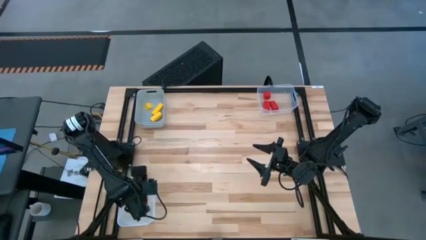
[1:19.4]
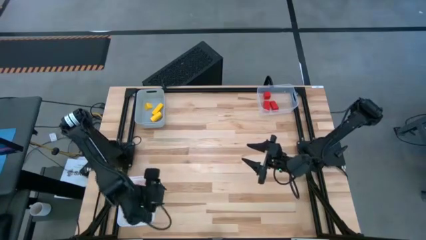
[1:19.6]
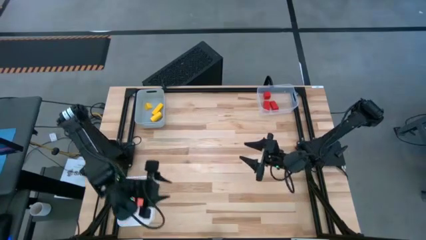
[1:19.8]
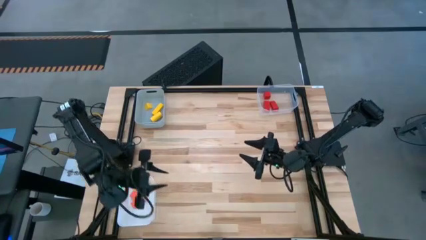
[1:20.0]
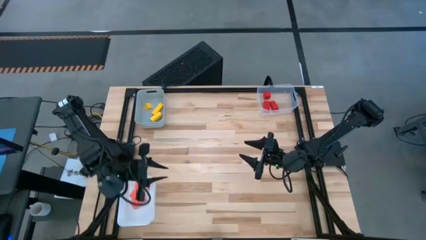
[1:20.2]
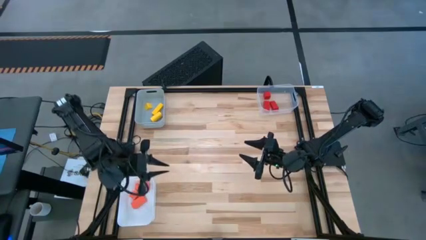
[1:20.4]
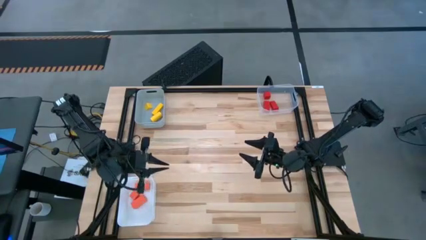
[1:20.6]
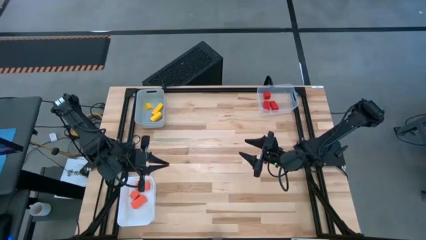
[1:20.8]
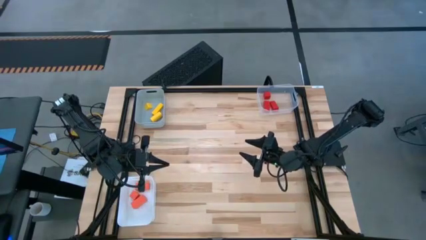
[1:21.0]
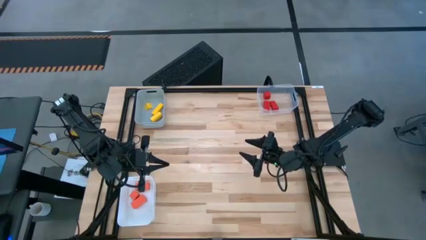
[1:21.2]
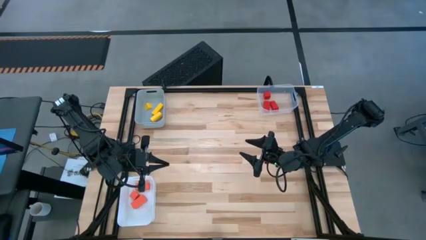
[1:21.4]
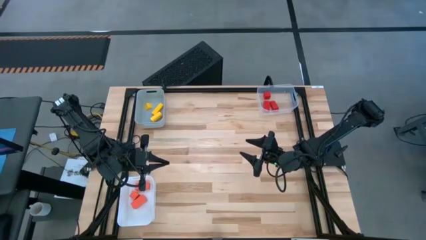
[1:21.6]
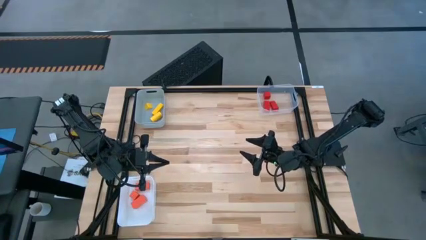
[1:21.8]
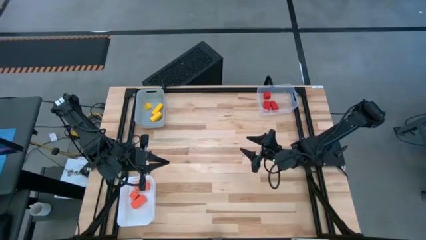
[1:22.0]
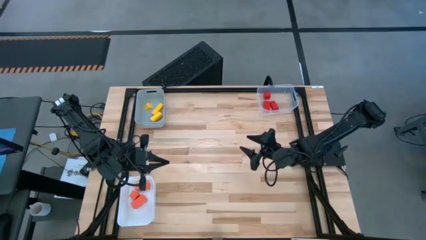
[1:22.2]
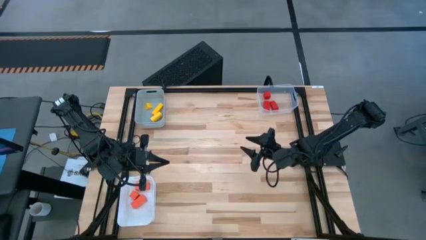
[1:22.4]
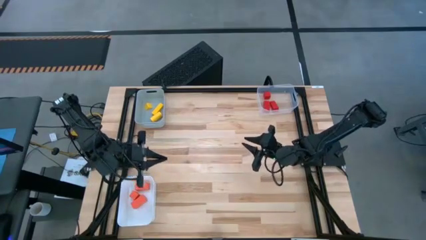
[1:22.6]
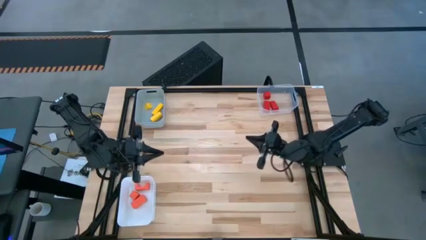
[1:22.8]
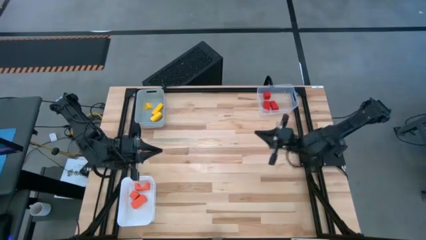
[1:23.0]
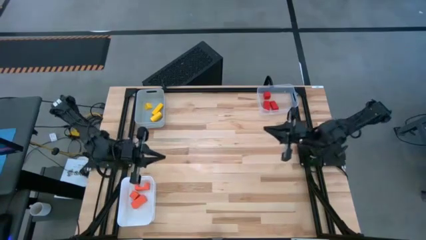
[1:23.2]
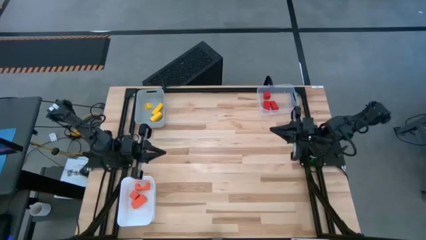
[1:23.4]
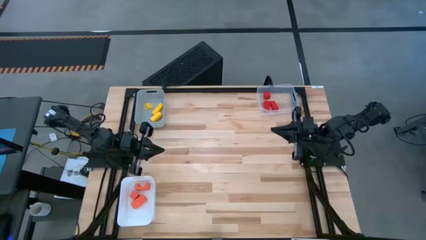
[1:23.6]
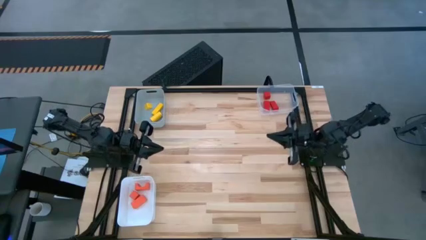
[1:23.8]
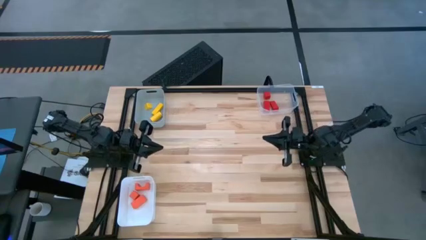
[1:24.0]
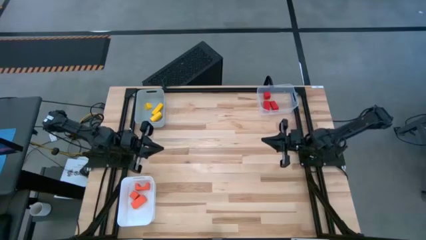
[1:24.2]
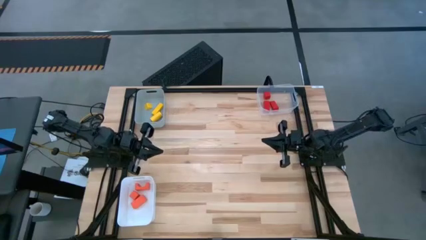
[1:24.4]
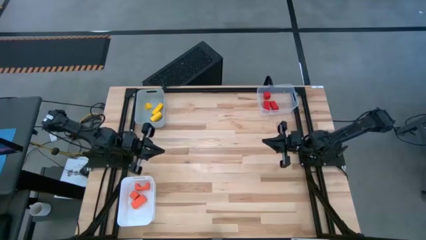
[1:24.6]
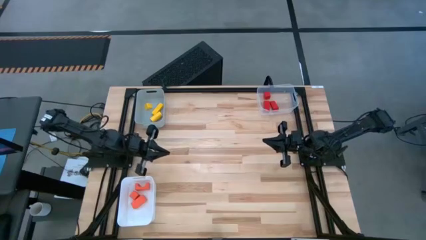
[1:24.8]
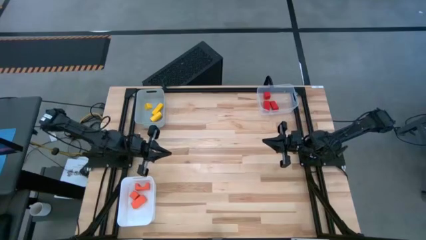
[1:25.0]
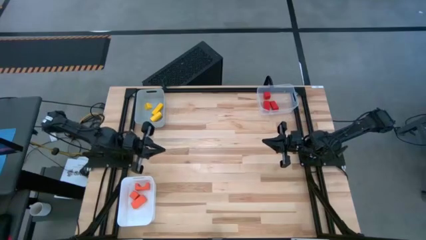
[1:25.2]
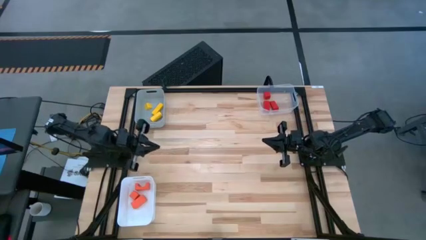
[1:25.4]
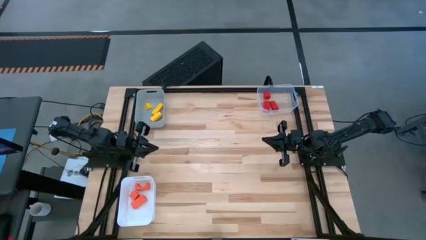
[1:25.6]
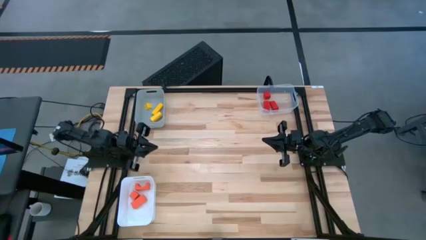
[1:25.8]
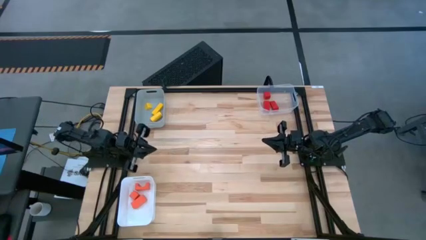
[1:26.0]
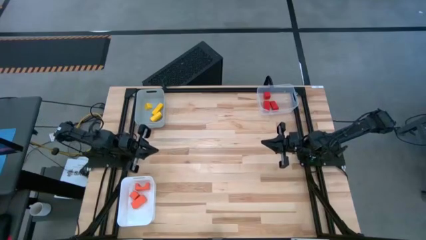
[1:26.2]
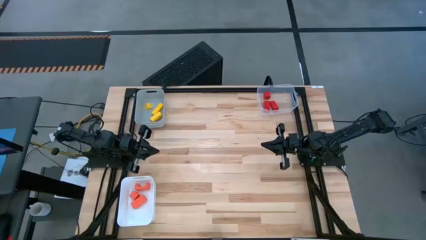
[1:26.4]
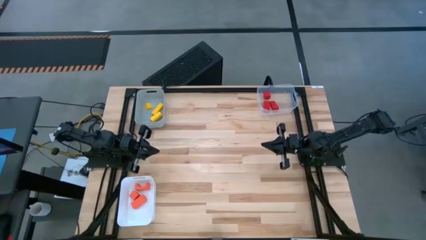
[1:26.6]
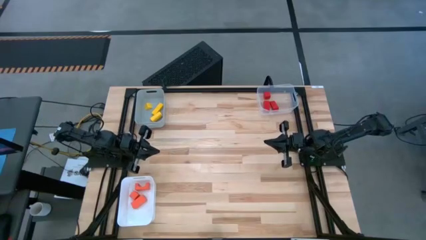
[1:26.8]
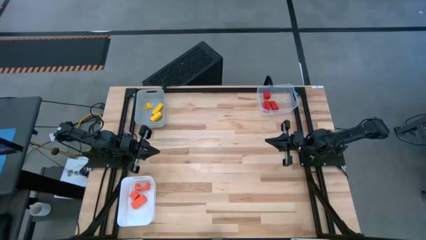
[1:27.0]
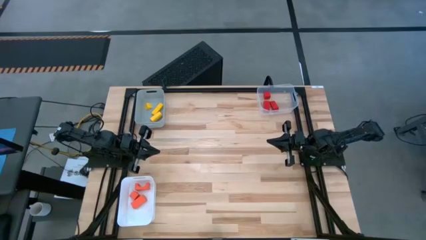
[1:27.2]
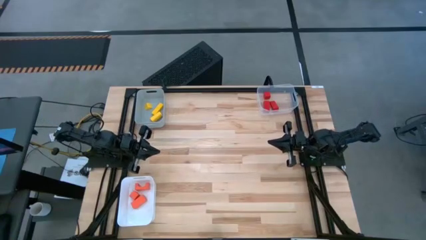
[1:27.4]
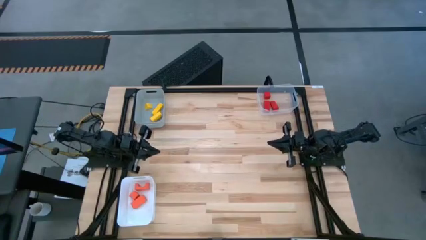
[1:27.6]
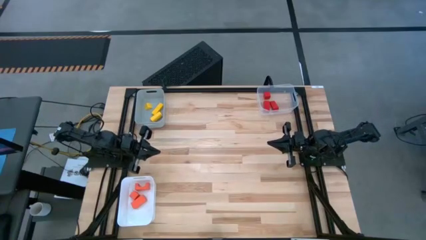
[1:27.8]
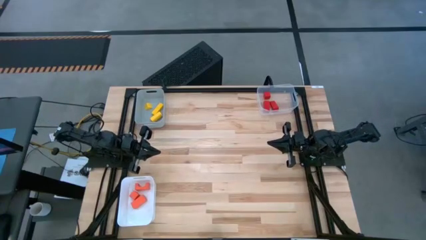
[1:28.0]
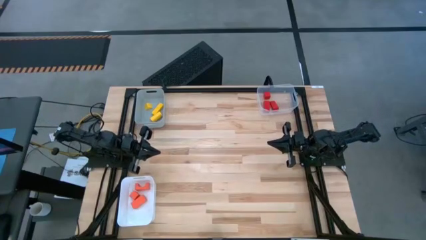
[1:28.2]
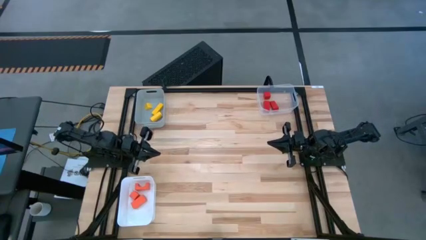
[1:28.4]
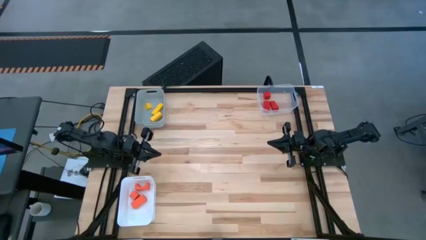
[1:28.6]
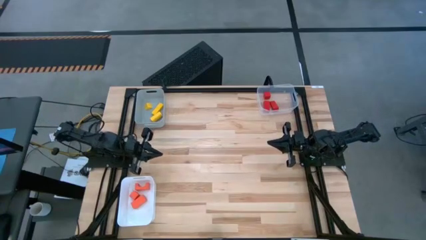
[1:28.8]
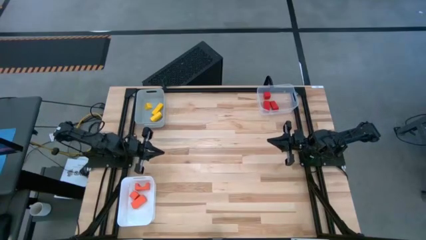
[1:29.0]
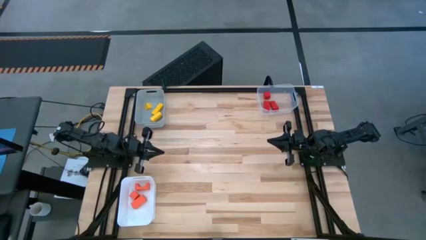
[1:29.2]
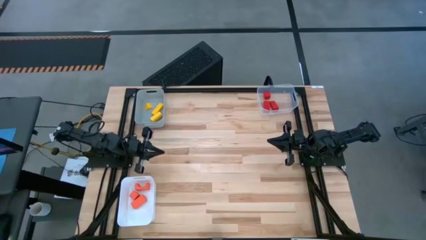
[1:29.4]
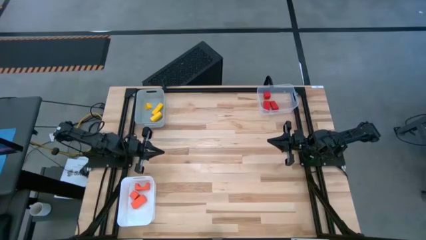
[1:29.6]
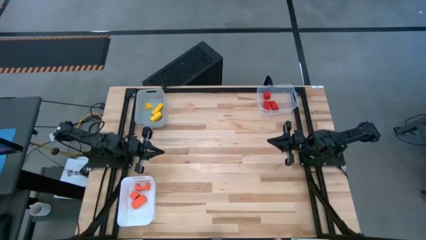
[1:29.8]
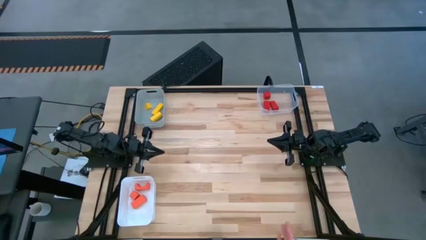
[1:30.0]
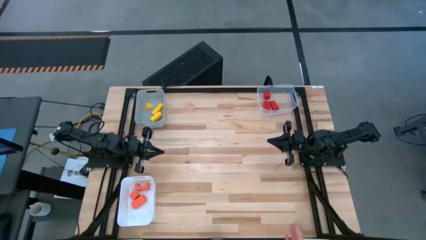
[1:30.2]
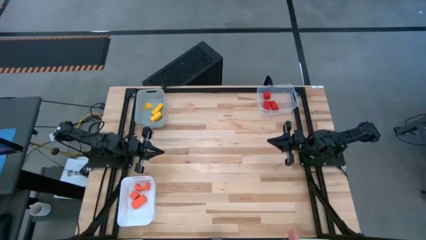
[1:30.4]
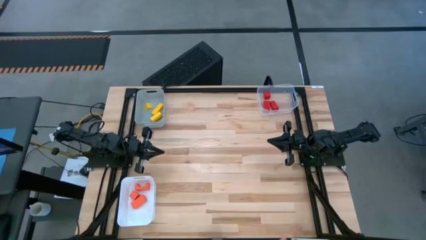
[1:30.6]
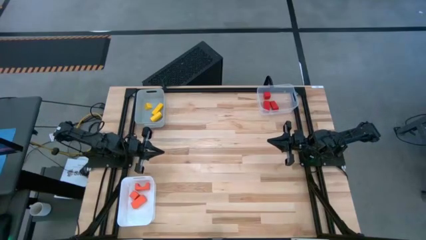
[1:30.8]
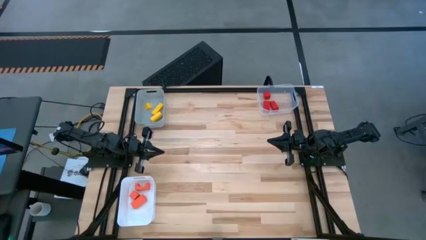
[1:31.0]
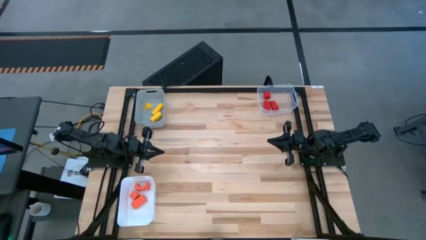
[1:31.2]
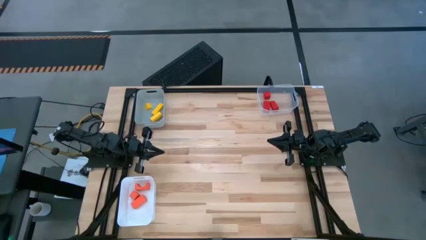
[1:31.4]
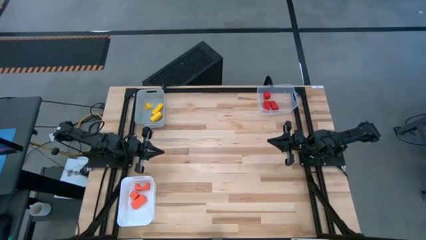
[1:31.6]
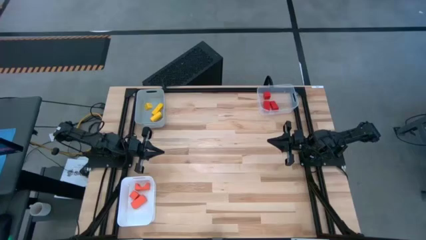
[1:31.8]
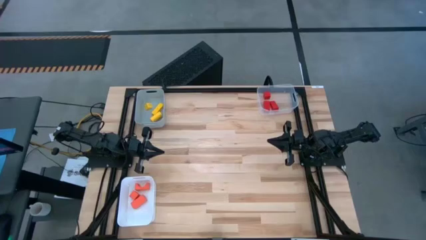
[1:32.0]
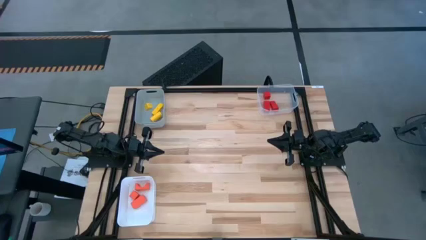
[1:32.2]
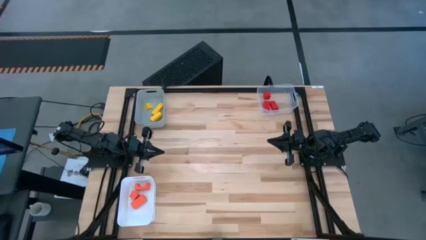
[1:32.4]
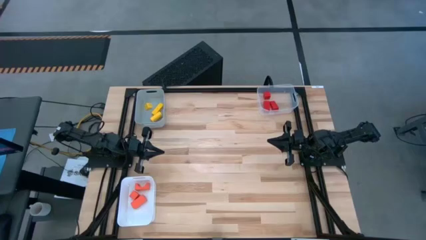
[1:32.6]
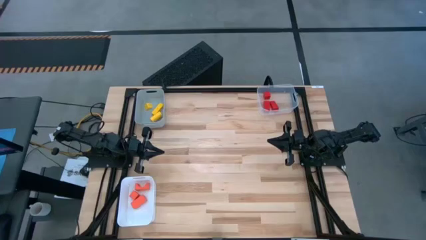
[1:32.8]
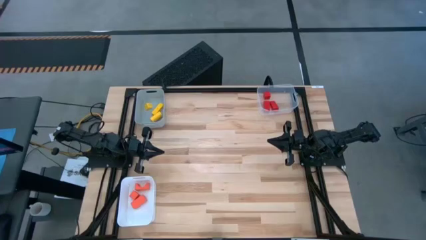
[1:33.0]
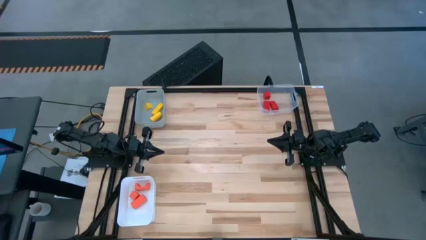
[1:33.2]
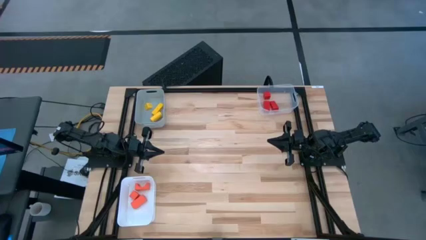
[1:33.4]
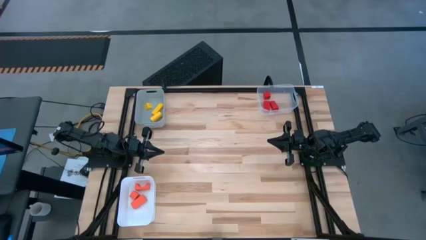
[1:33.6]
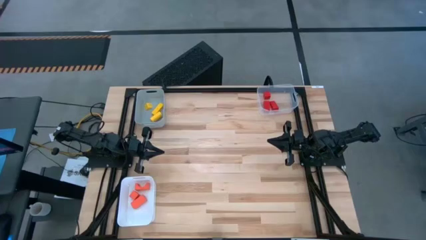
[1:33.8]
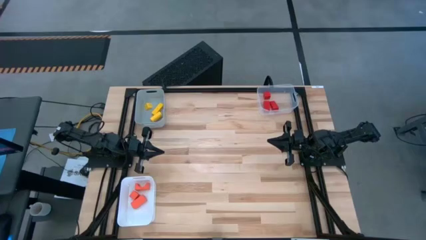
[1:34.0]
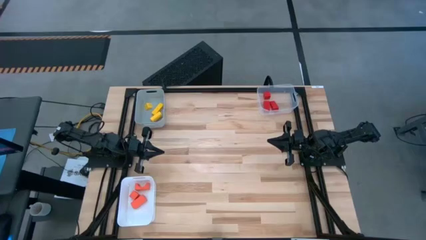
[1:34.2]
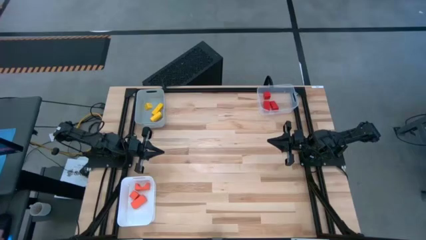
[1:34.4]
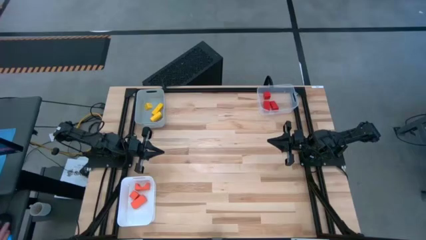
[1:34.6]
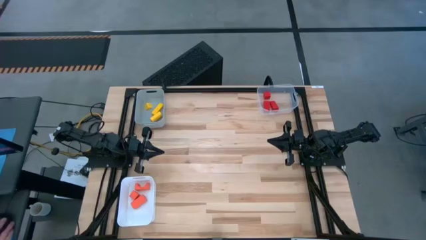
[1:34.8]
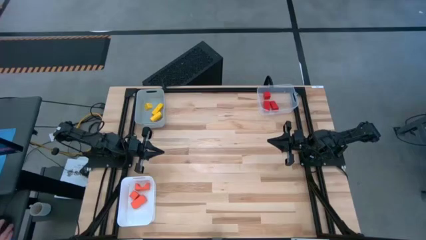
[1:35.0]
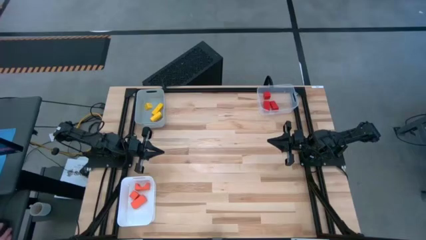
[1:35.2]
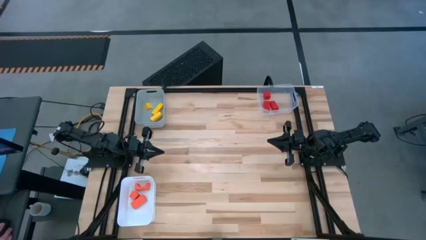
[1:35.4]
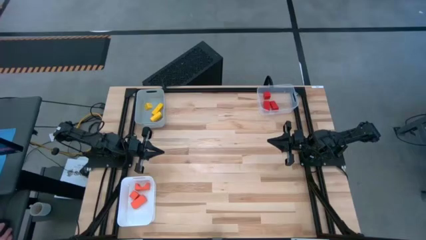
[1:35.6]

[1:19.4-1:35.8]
Task: Sort & place blocks by color
Return to Home Position
